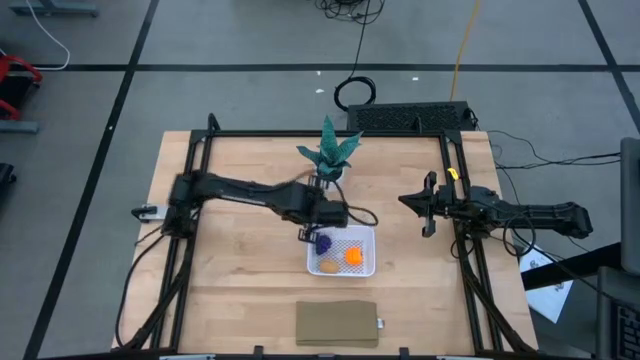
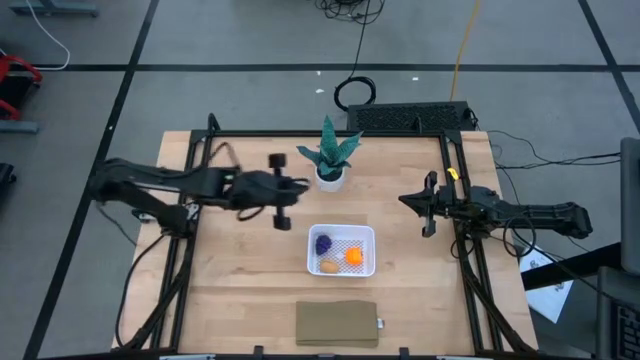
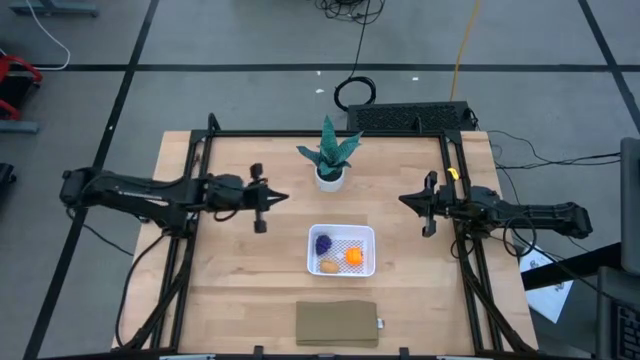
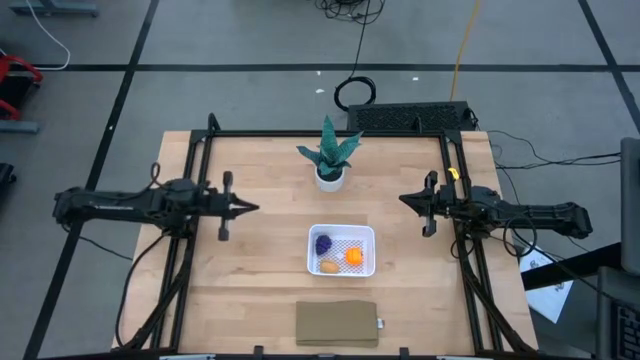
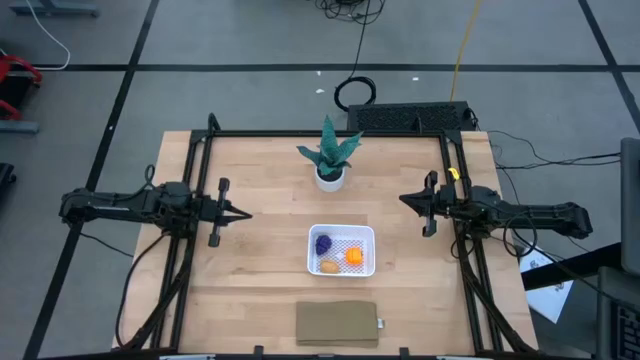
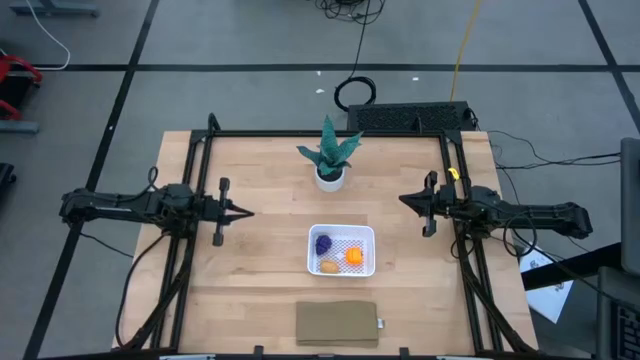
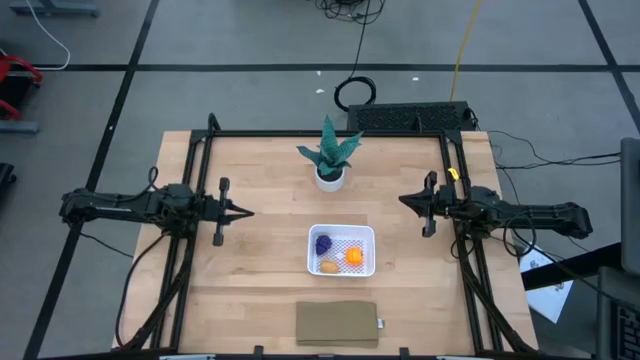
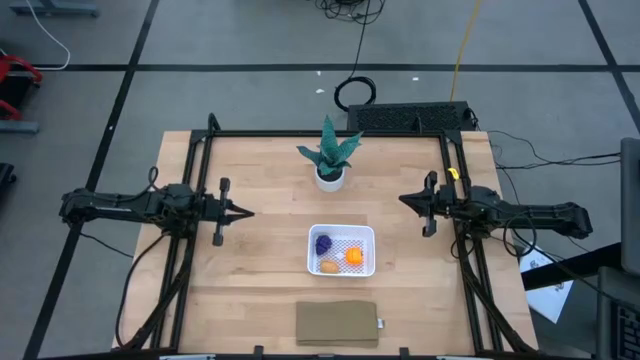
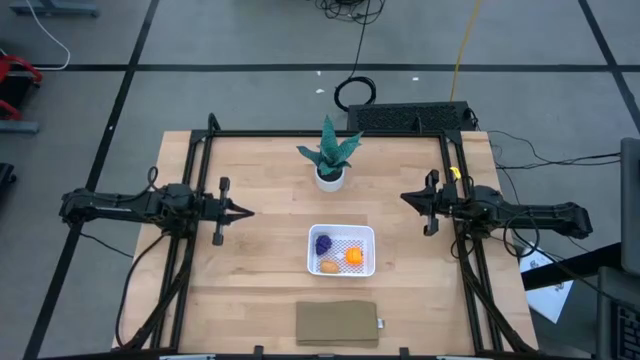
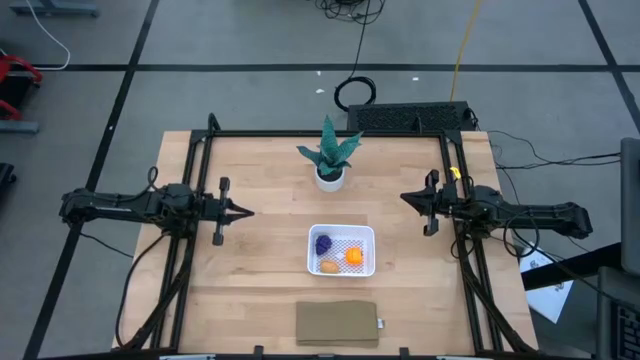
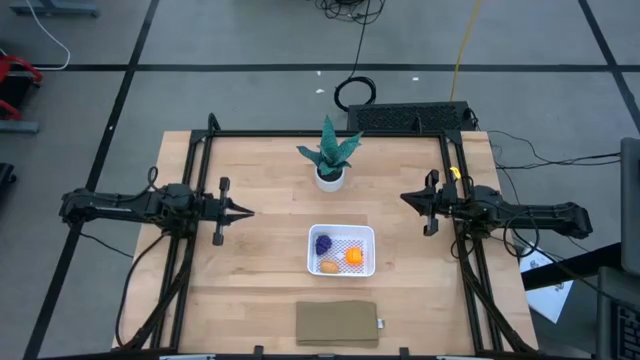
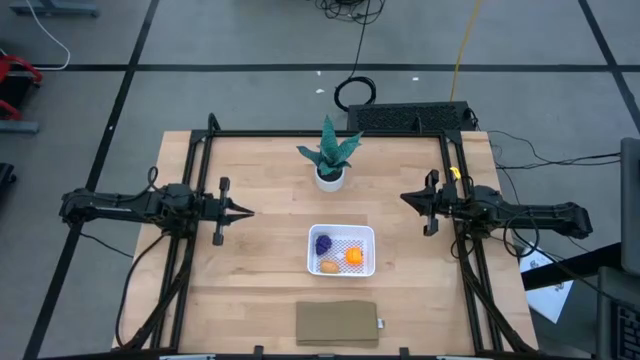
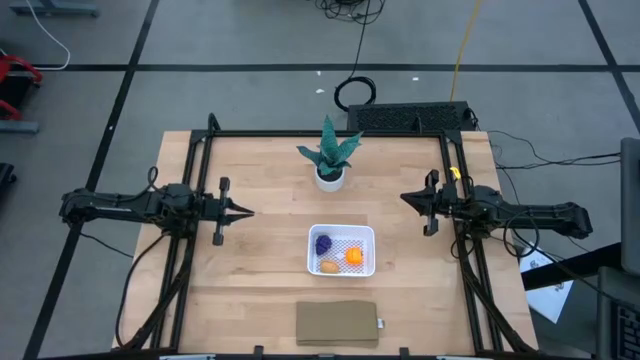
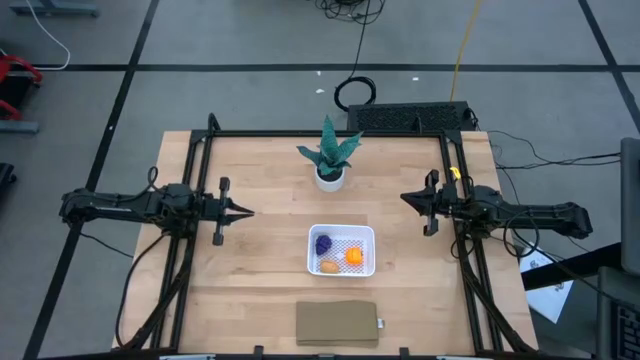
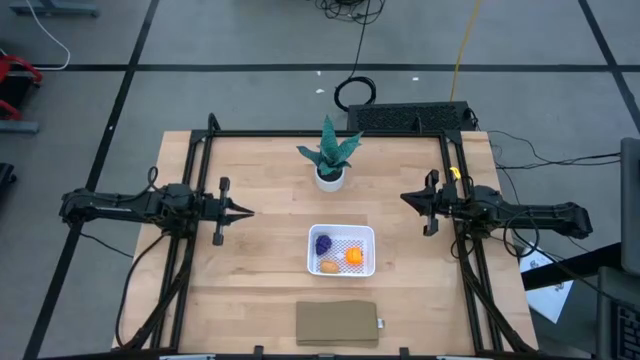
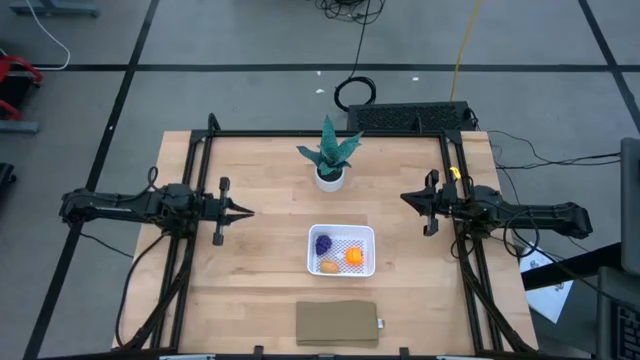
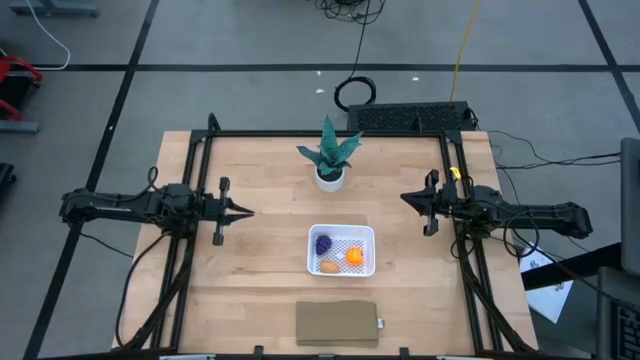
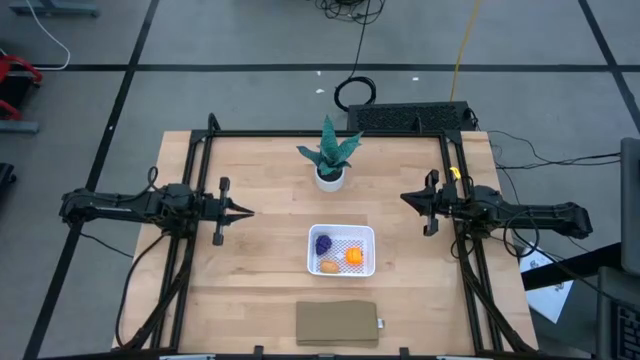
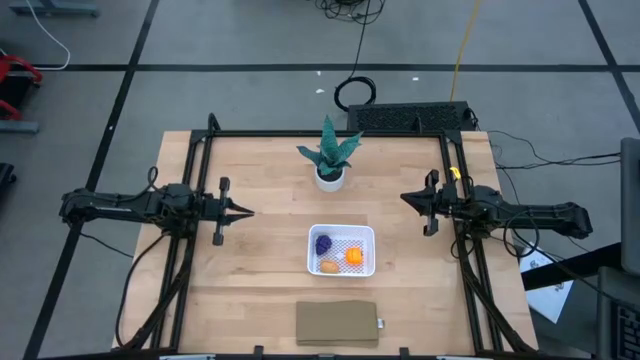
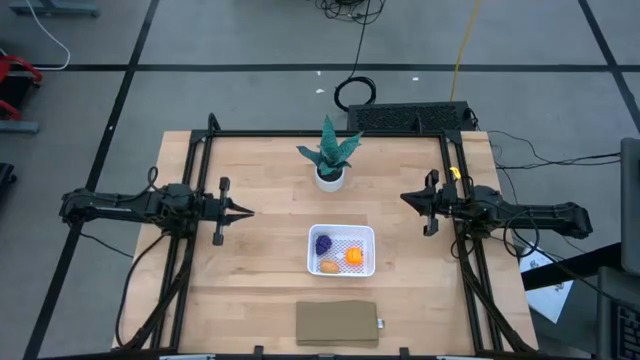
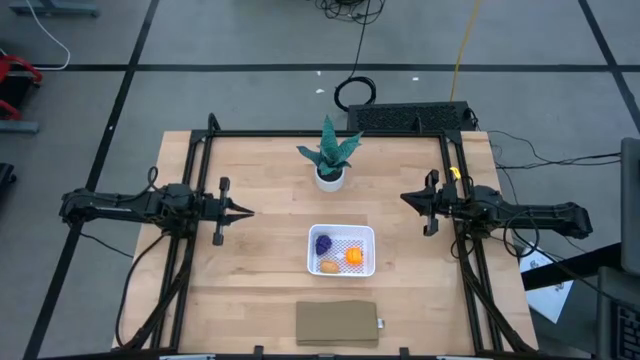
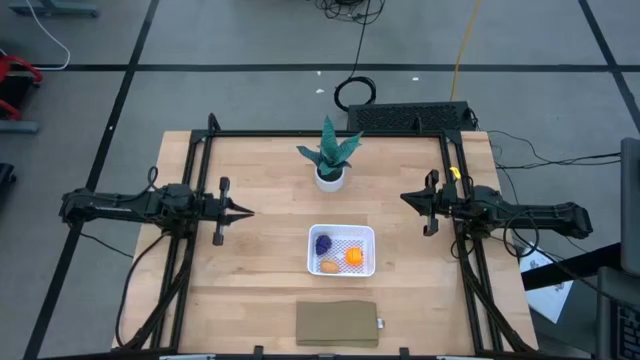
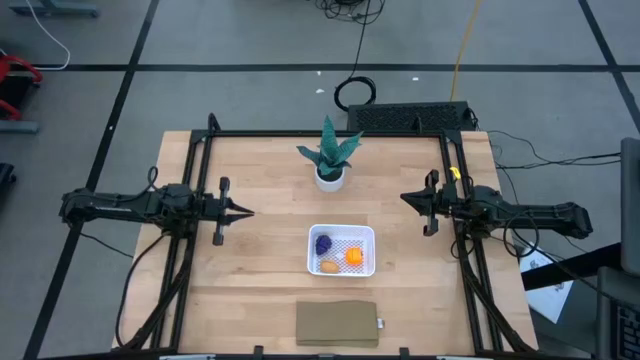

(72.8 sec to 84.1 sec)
Task: Pick and placing Produce into tupperware
Return to Home Position

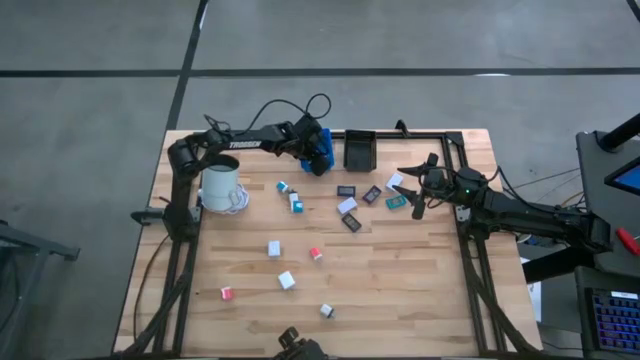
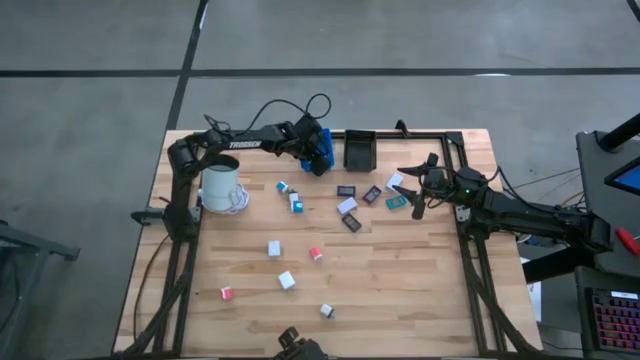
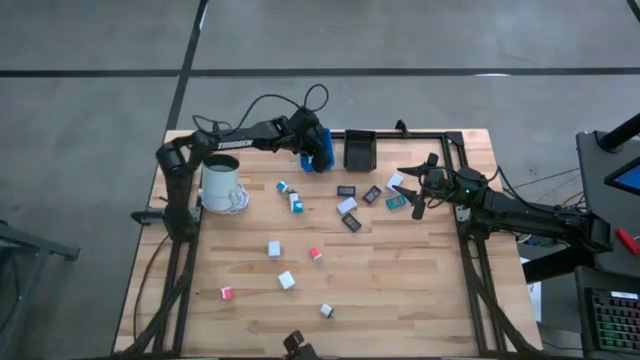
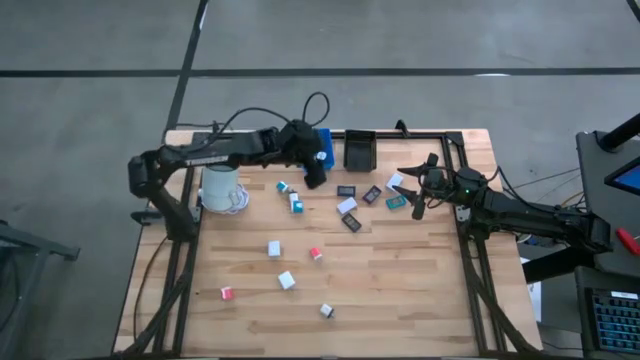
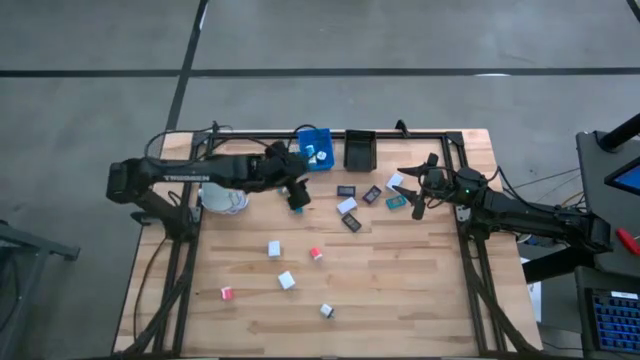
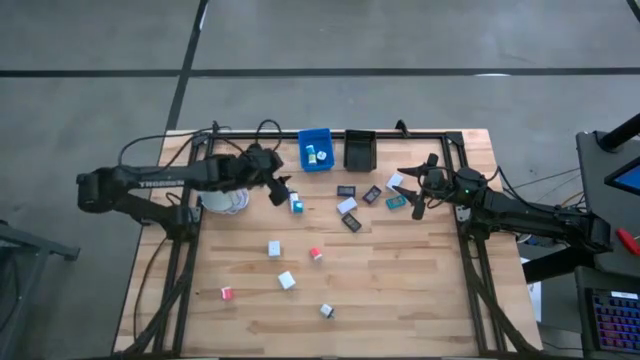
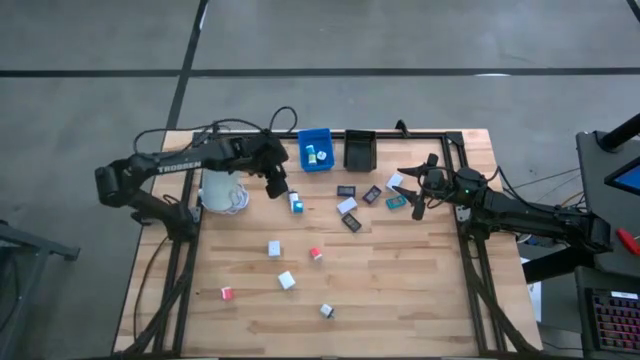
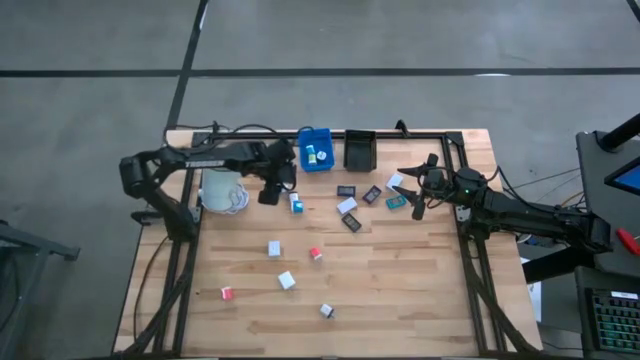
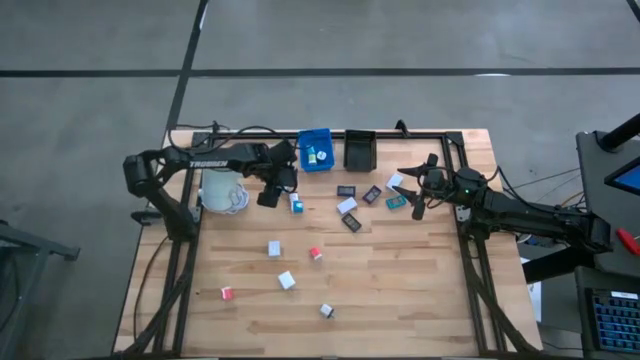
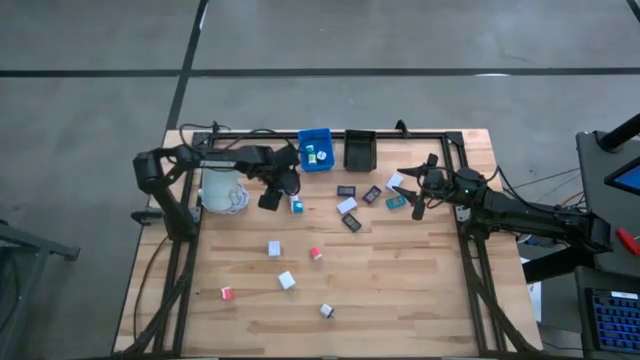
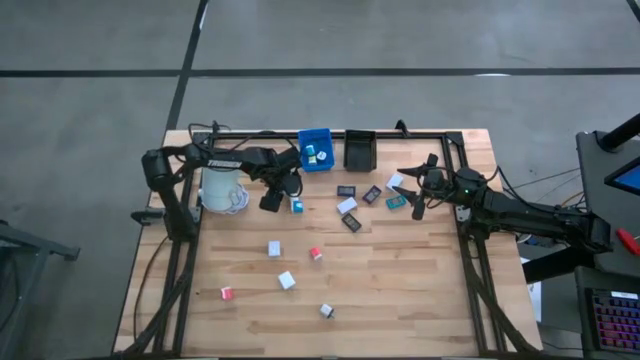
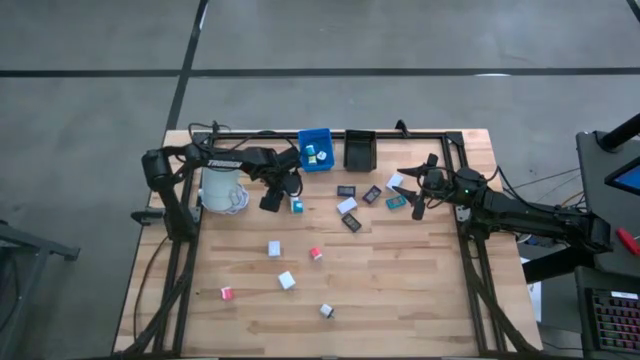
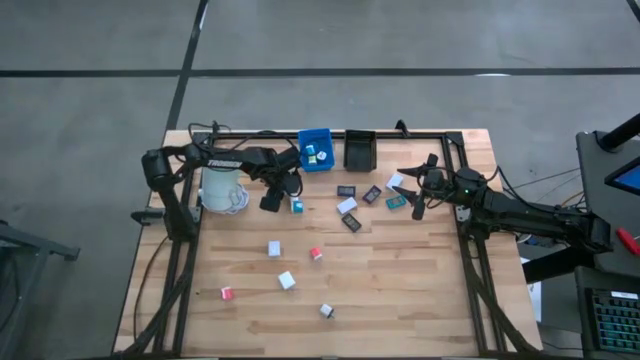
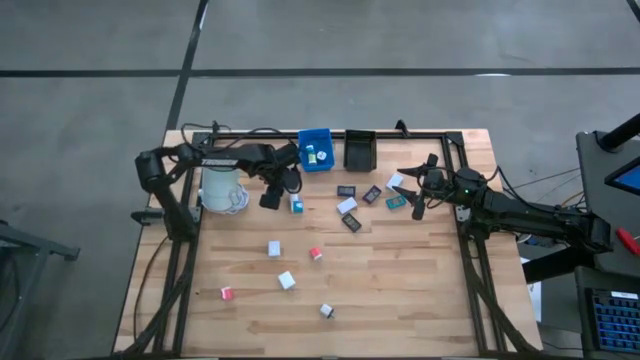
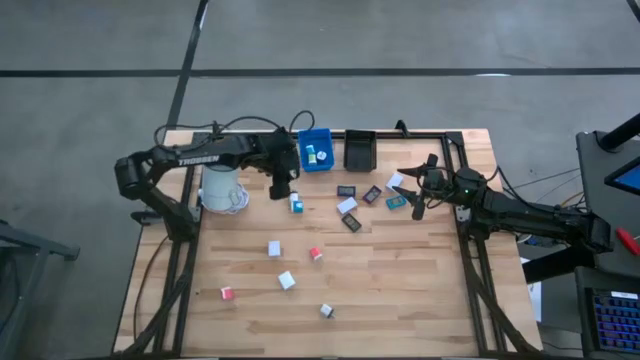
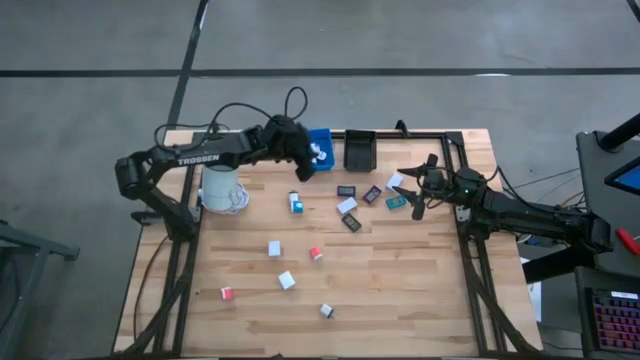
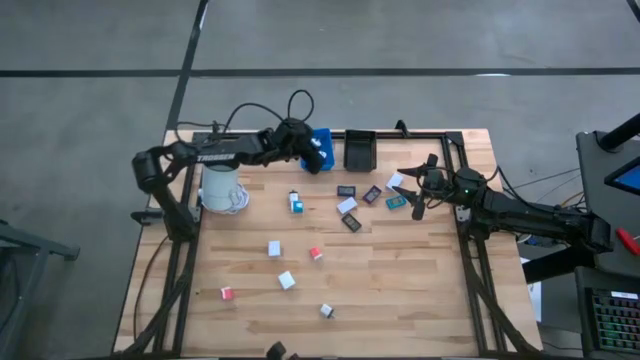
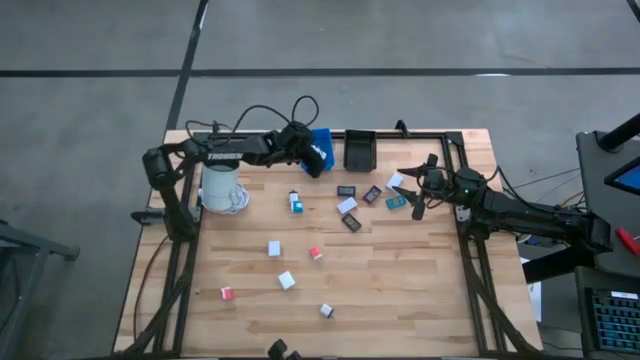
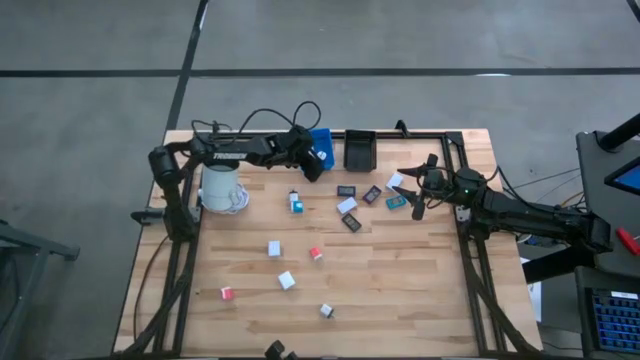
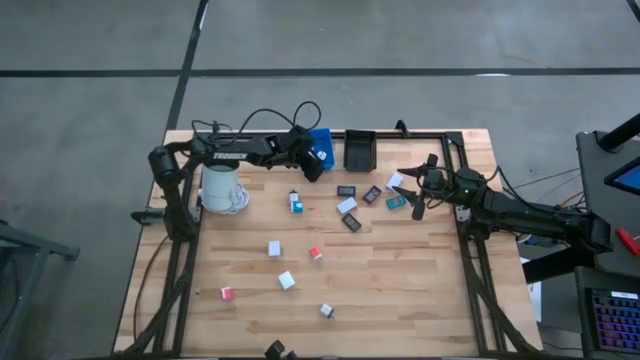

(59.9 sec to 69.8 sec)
Task: Pick & Place Office items
Put the small blue adapter into the blue basket
